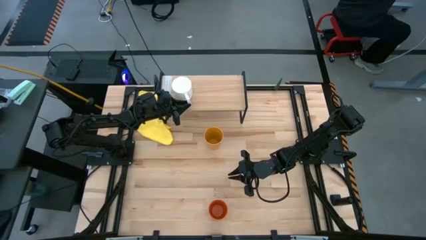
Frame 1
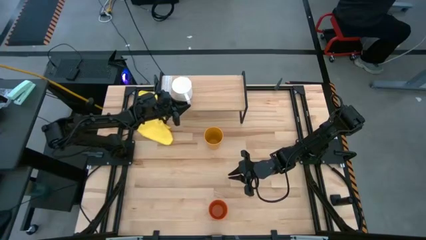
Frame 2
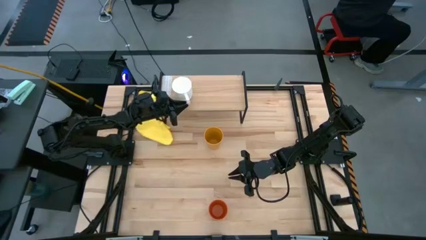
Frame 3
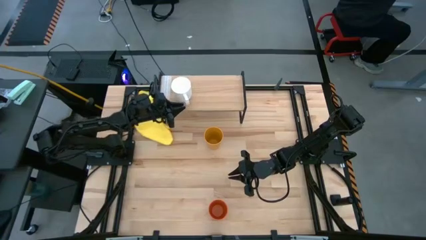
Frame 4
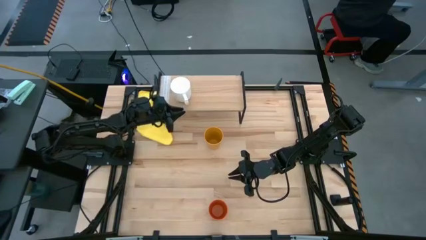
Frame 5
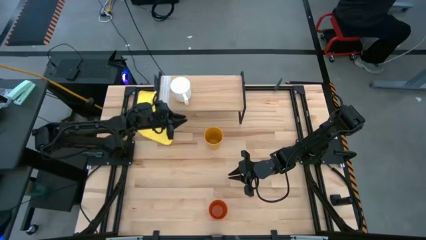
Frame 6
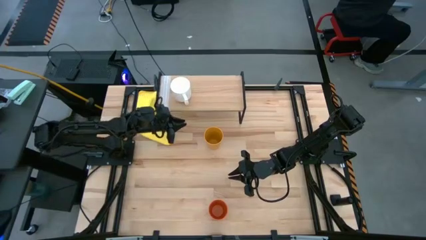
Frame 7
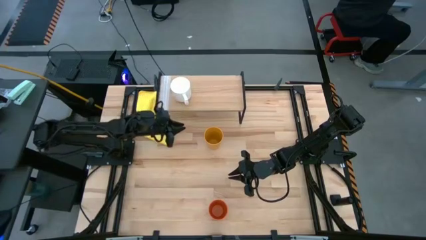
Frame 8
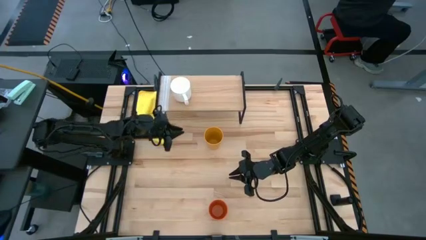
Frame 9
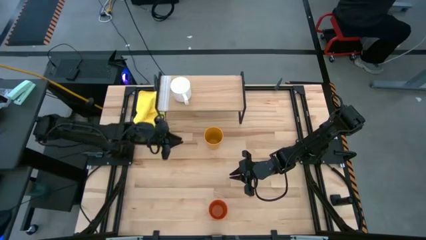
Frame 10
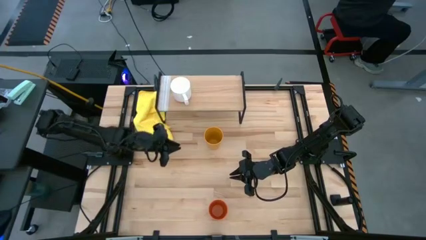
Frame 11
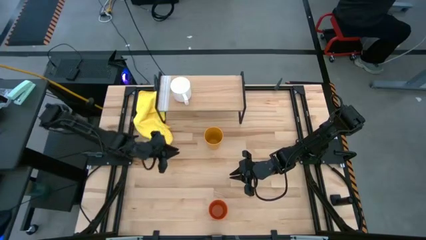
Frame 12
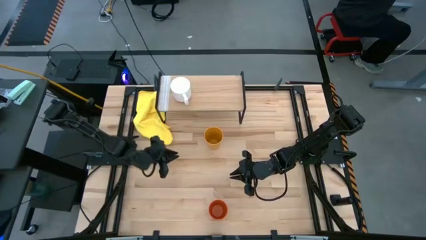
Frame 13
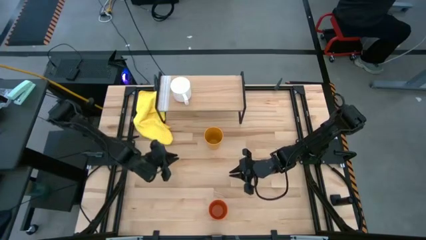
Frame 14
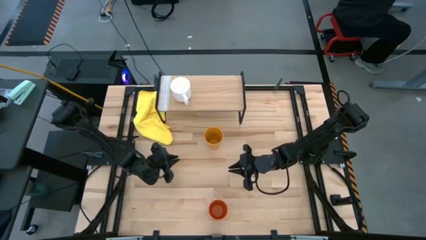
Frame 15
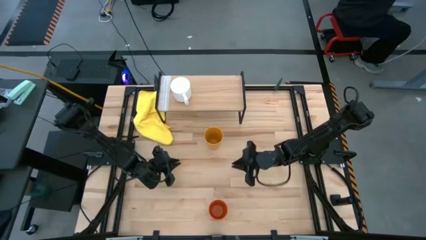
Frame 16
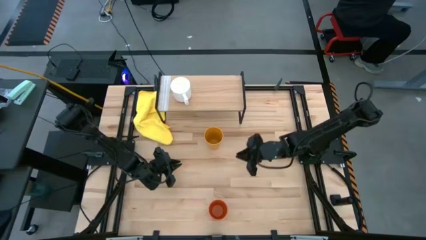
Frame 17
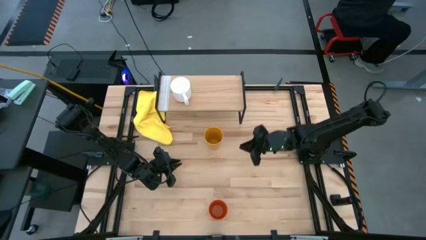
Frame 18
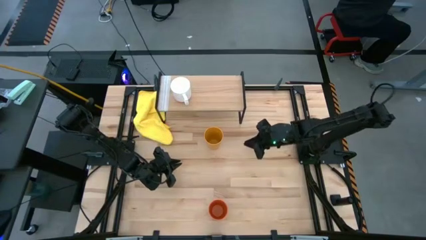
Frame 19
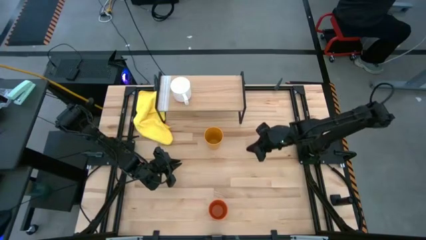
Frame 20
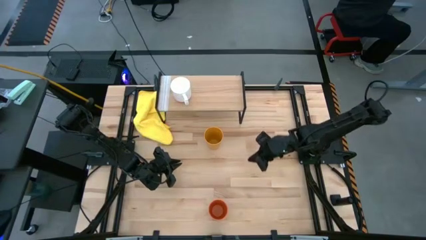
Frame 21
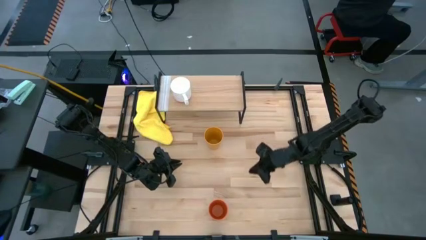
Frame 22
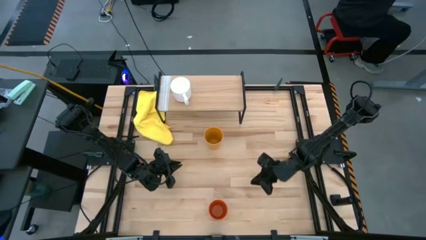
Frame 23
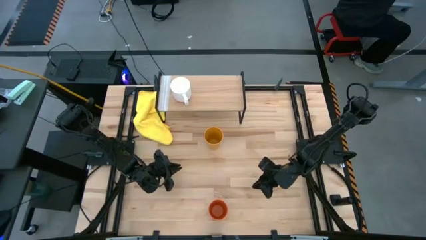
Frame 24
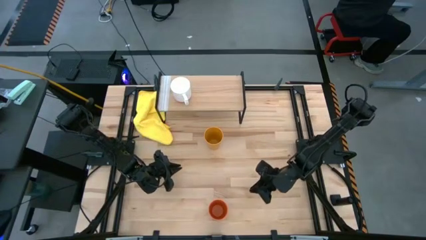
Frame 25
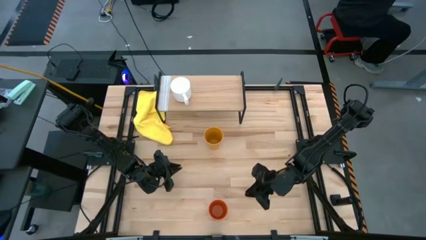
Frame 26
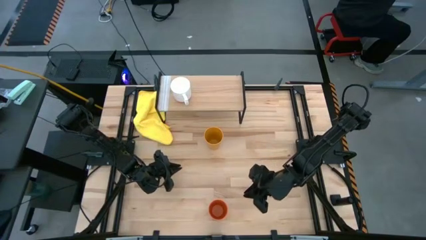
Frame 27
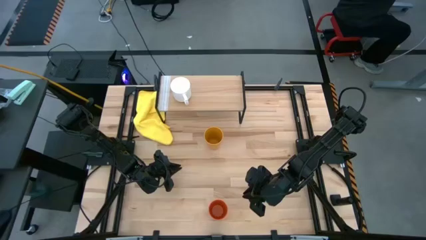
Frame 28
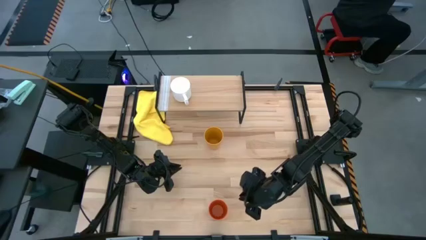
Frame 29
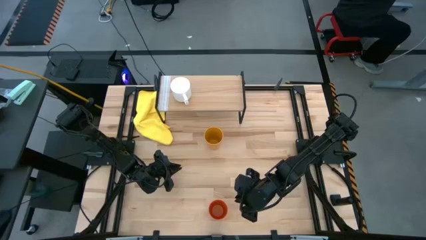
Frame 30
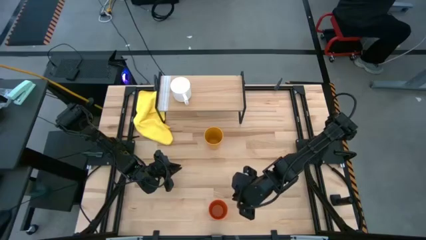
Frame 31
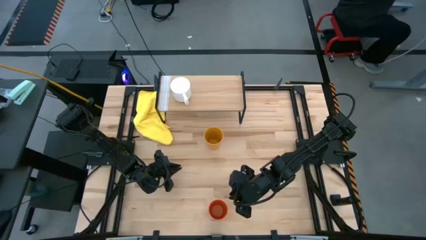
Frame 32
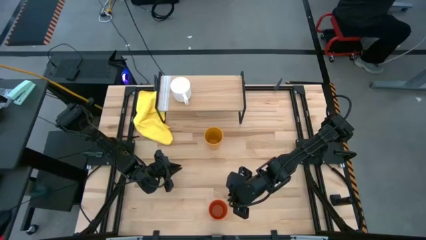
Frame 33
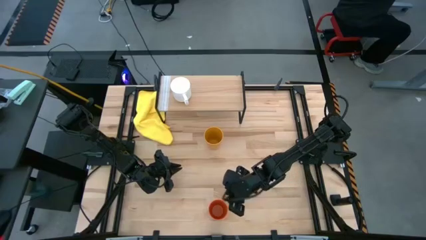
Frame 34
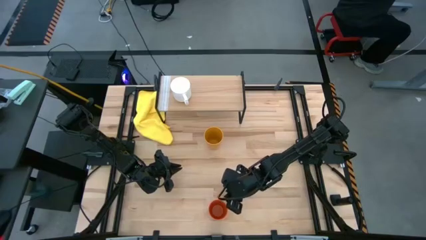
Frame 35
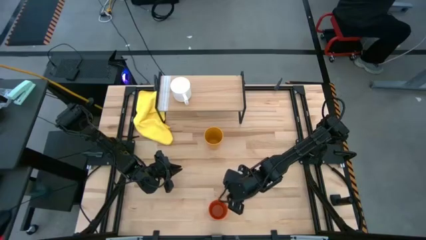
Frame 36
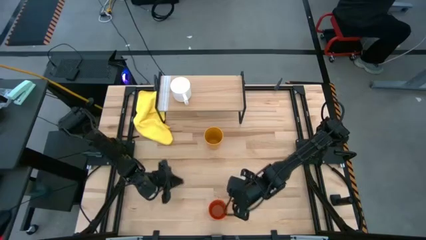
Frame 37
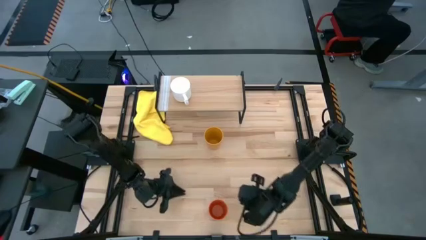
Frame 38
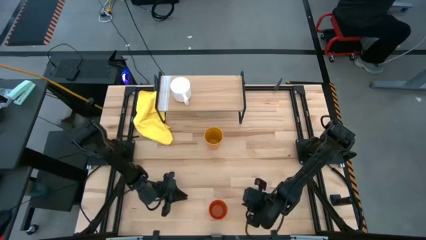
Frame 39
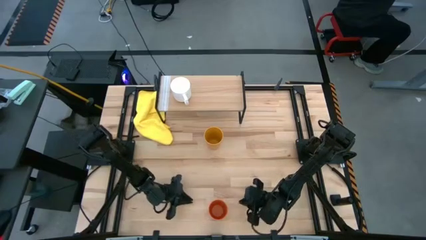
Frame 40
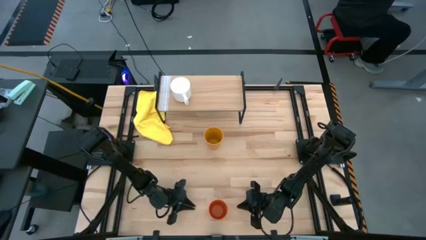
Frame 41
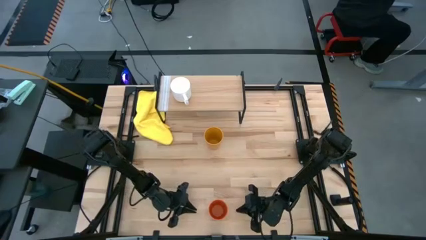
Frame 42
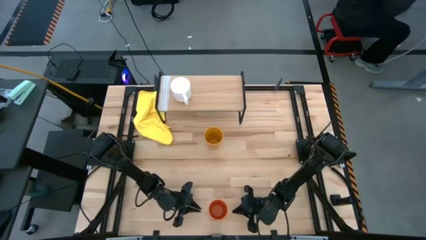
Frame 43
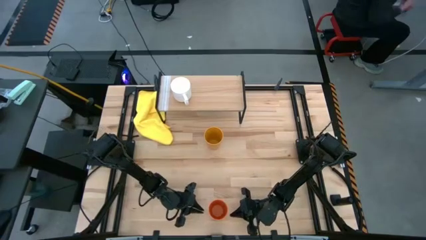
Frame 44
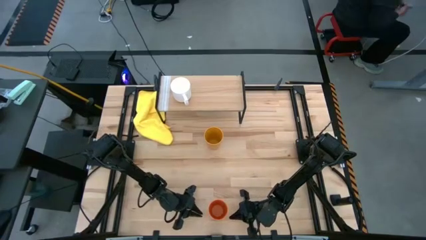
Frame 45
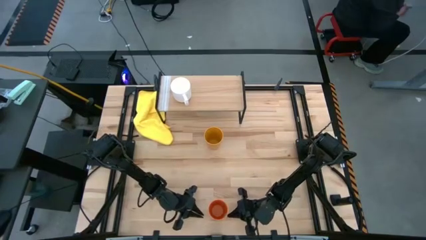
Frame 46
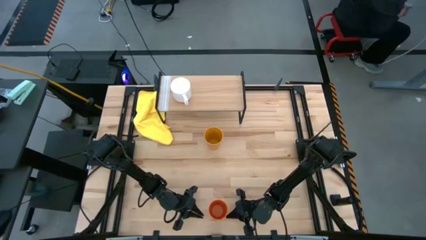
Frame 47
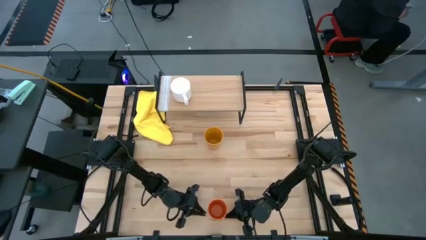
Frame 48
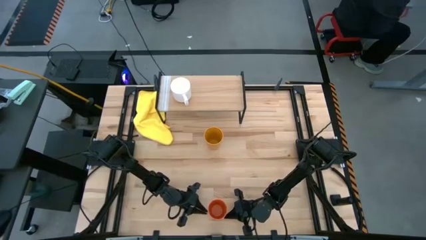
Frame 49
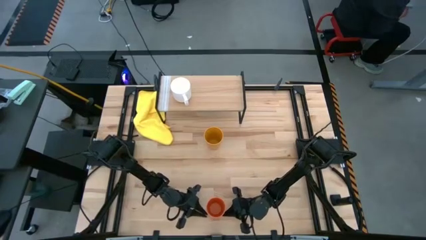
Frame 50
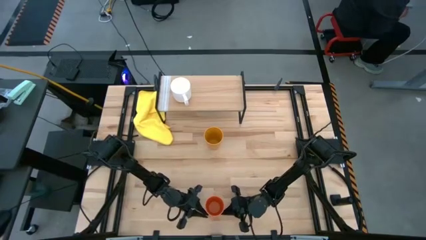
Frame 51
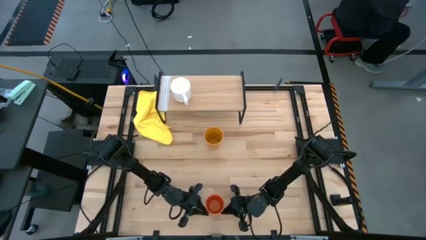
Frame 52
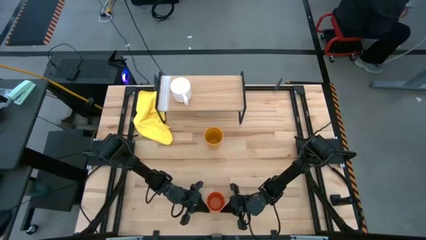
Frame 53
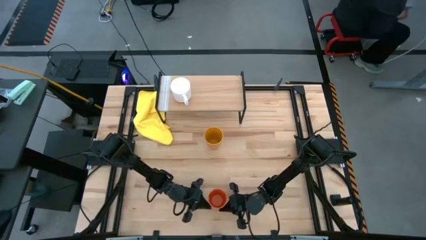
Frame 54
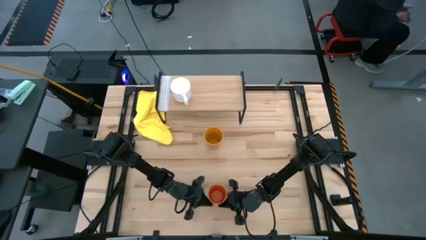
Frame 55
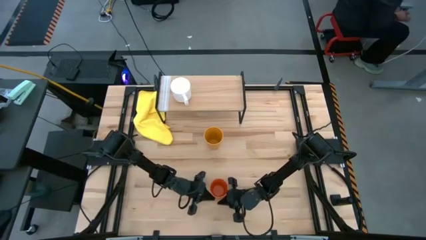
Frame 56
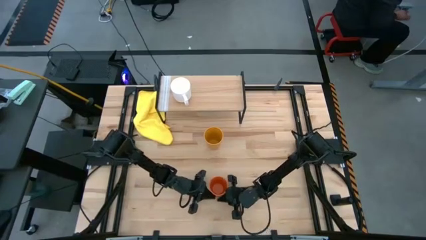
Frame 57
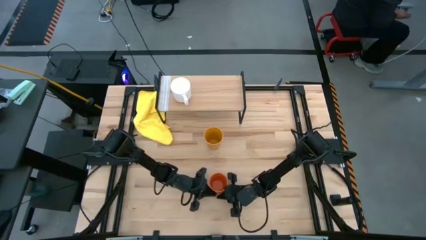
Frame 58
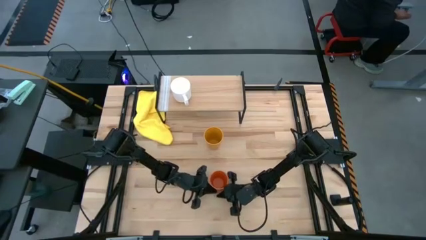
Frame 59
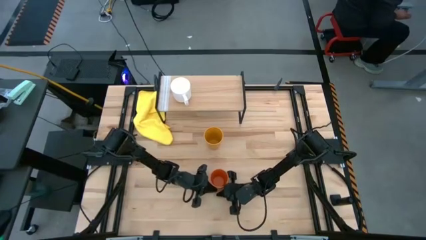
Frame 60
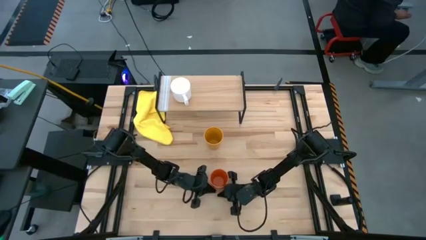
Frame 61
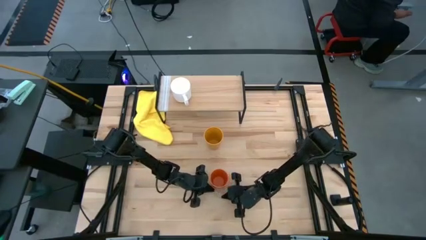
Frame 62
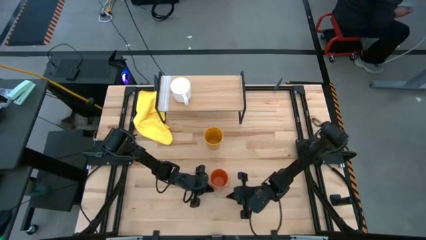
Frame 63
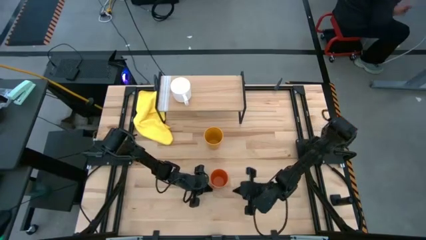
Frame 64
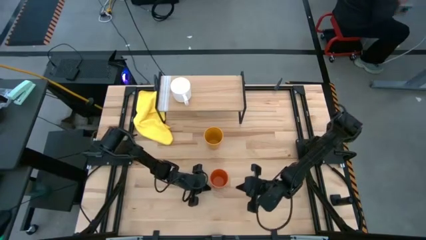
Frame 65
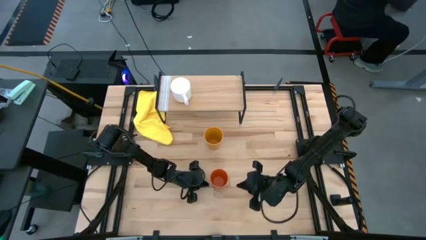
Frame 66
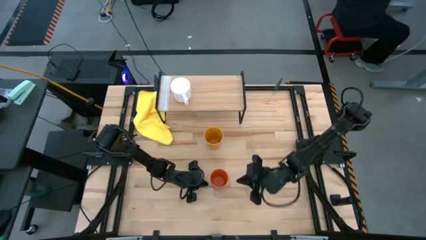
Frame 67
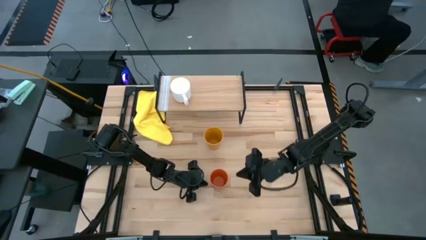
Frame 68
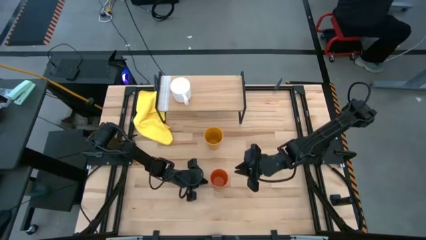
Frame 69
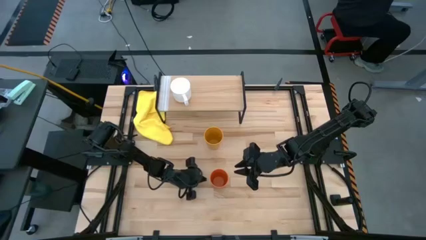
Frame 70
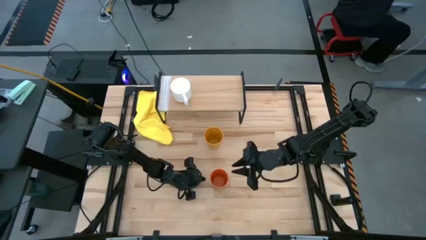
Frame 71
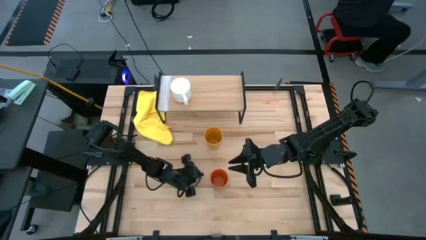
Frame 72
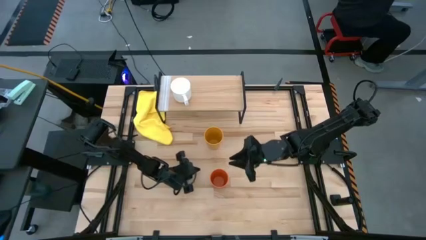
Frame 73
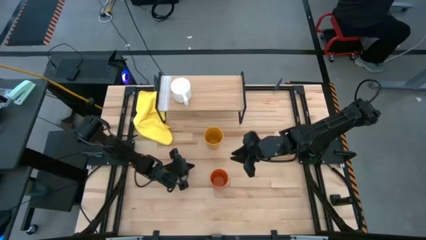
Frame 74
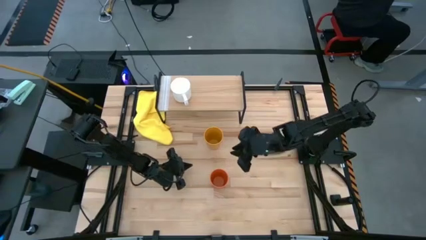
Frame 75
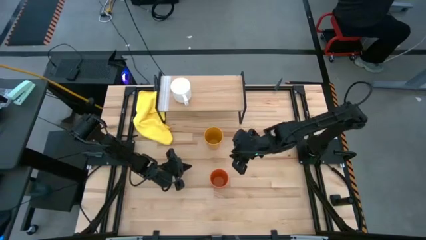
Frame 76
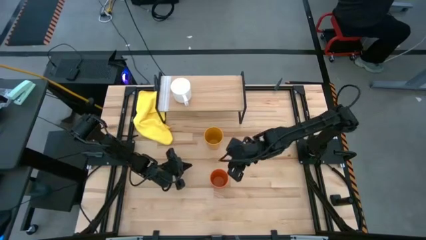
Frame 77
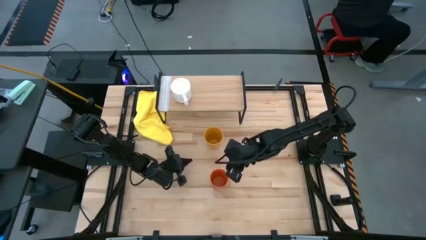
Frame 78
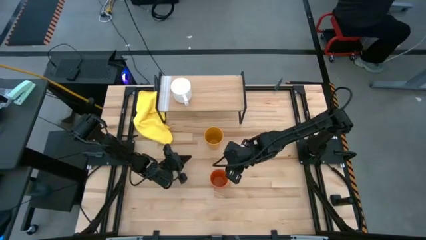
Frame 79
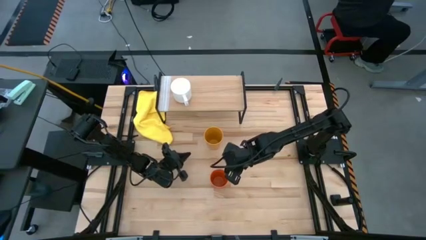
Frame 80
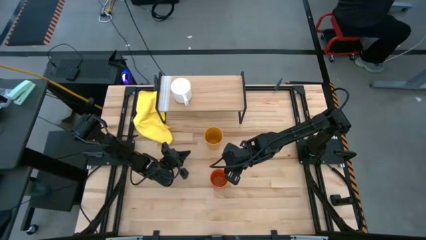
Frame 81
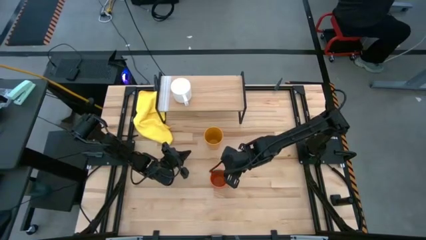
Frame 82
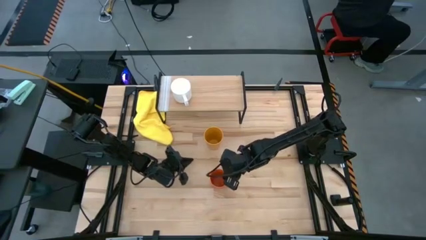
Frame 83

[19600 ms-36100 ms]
Task: Stack small to large cups/mugs on shelf
Put the orange cup on the shelf
